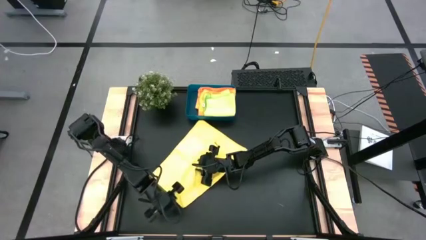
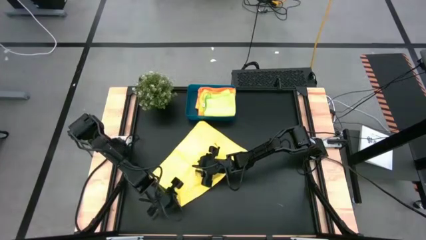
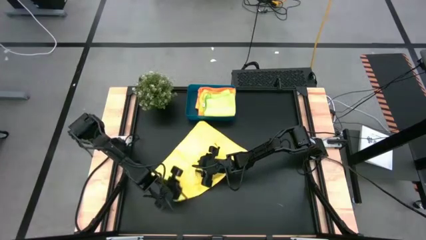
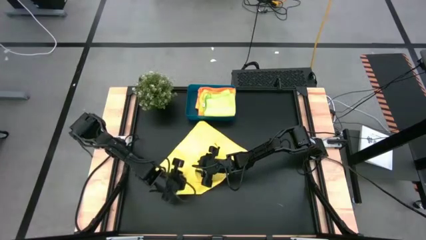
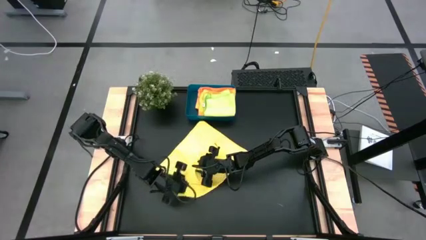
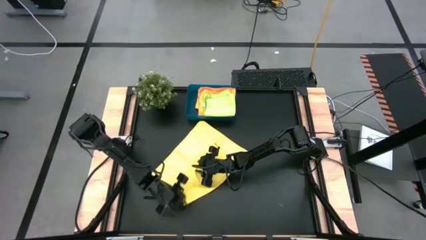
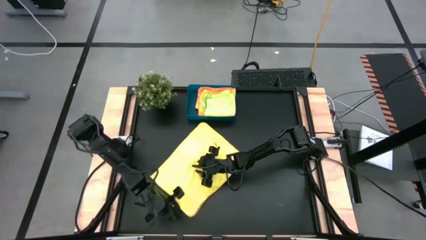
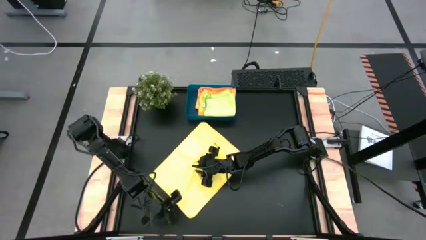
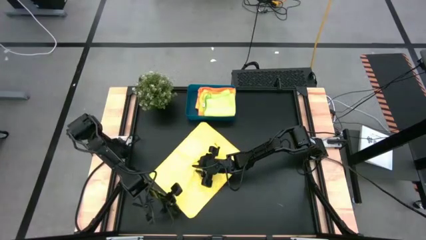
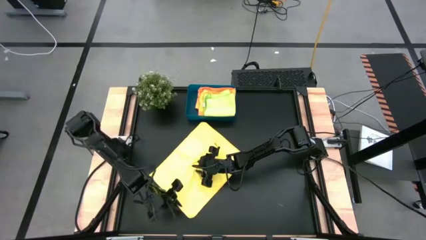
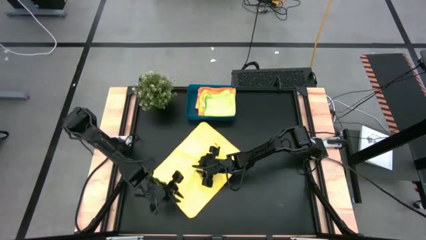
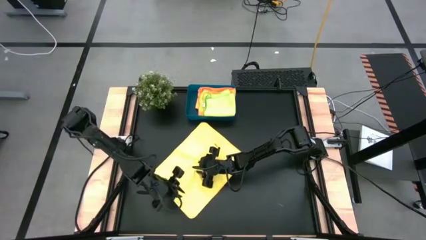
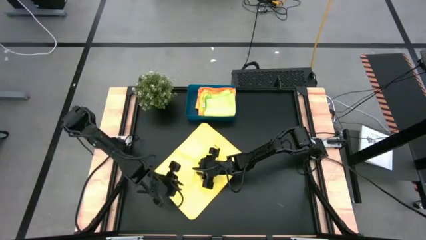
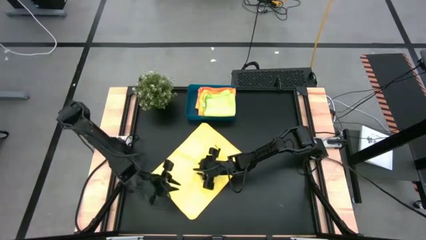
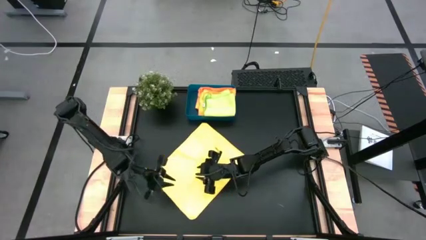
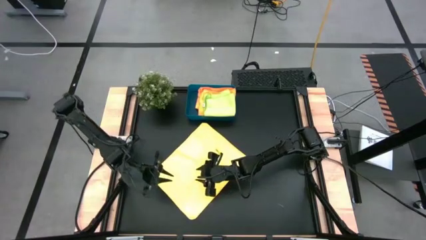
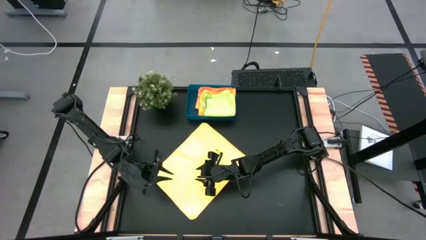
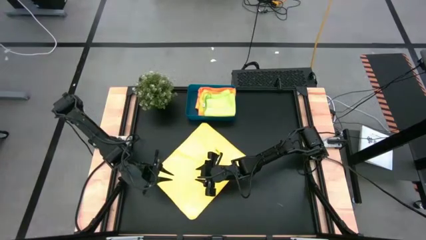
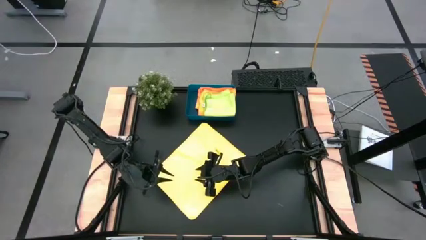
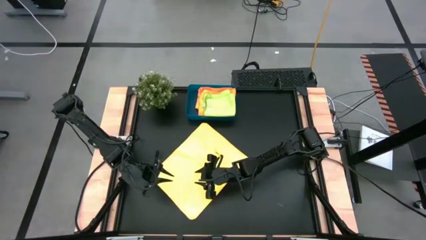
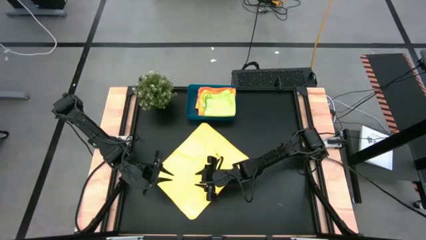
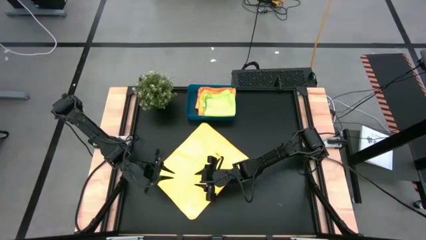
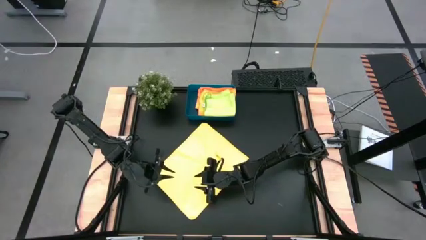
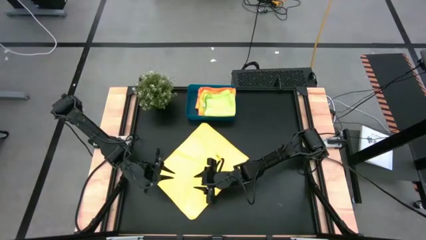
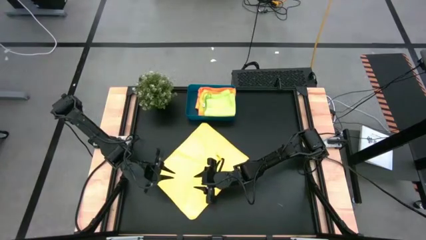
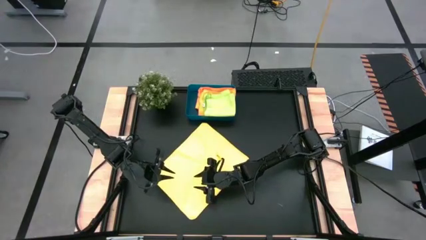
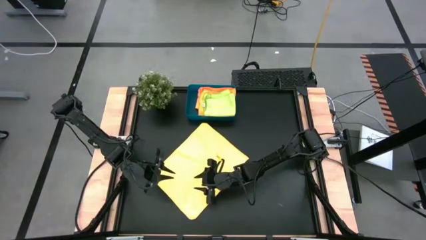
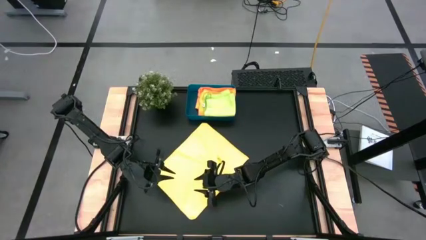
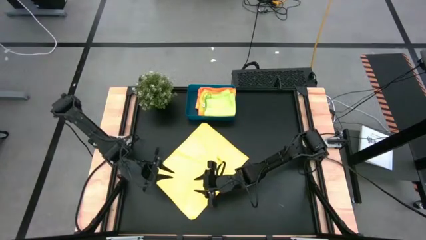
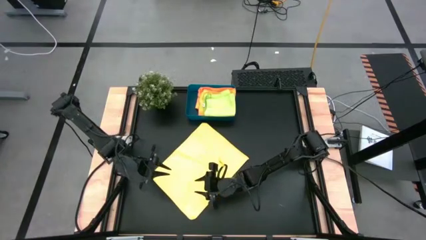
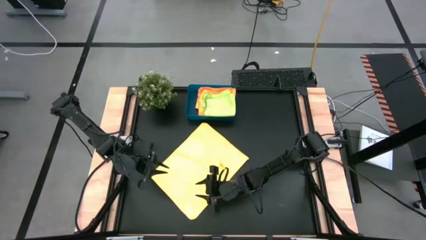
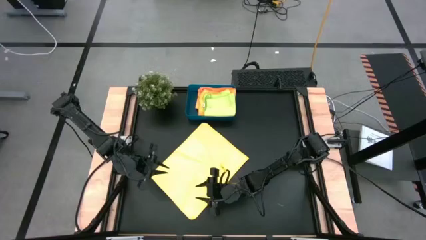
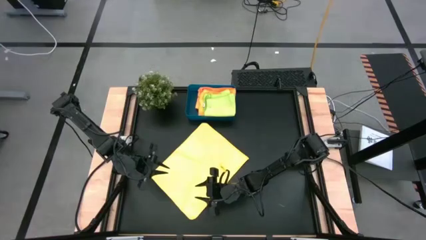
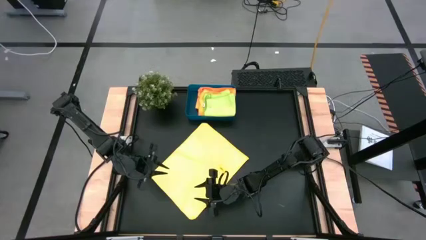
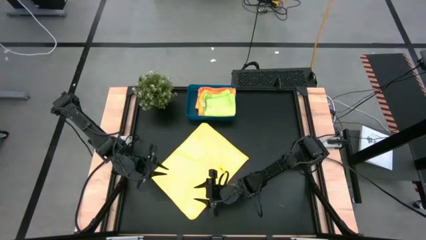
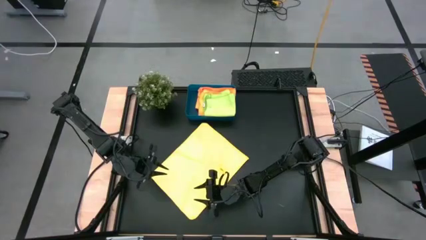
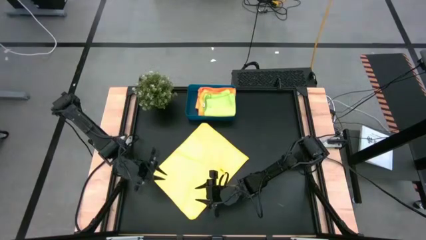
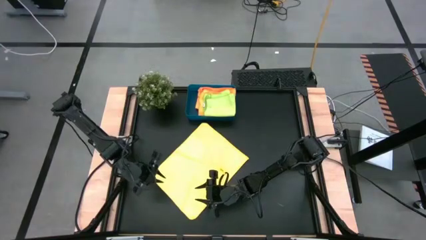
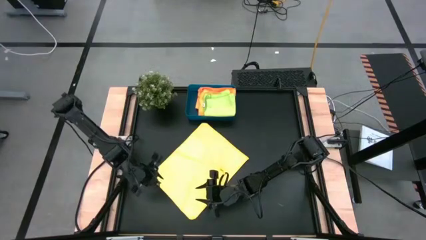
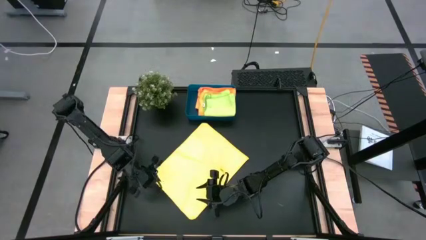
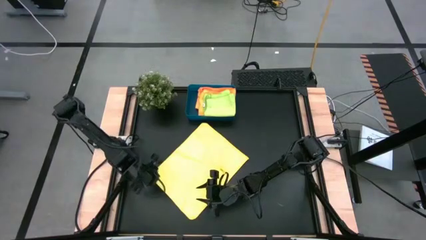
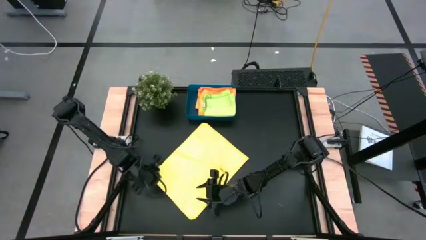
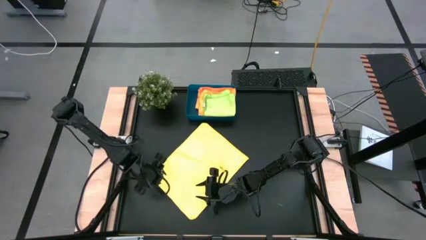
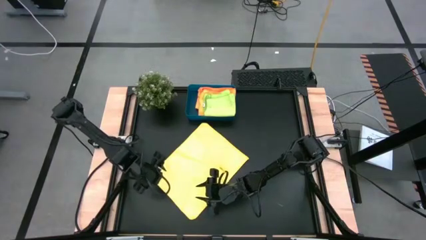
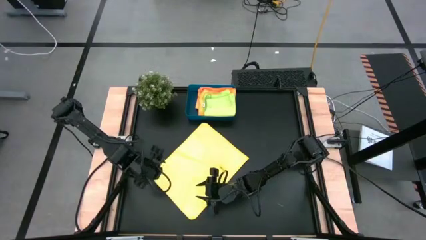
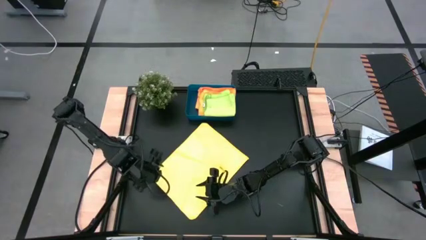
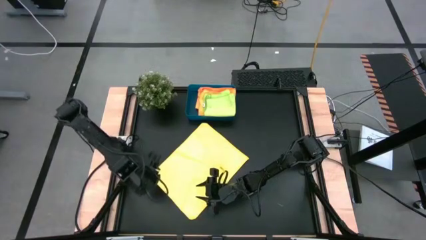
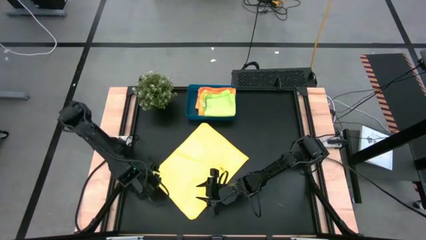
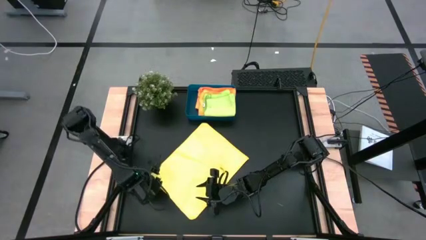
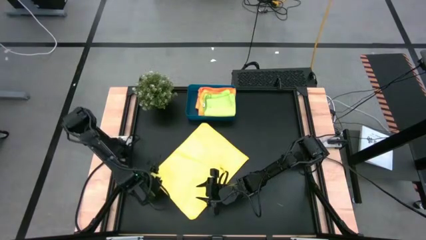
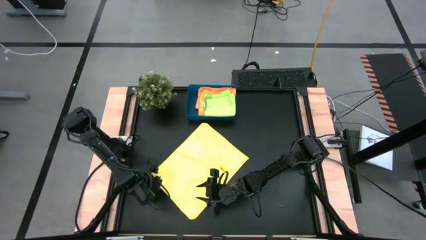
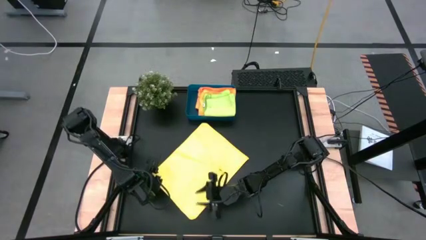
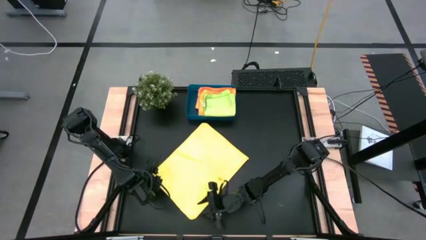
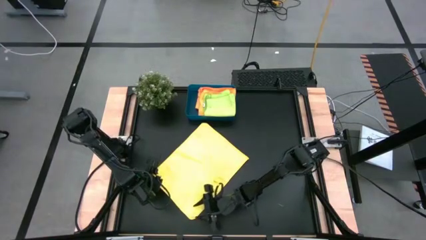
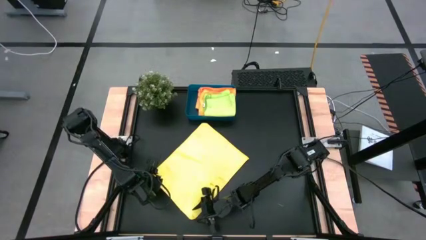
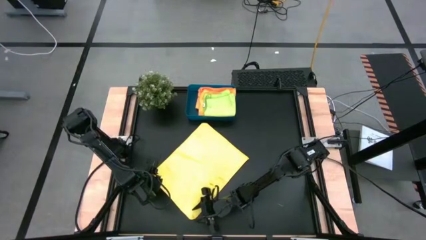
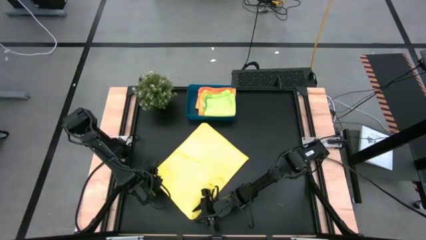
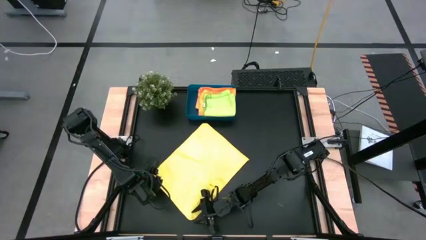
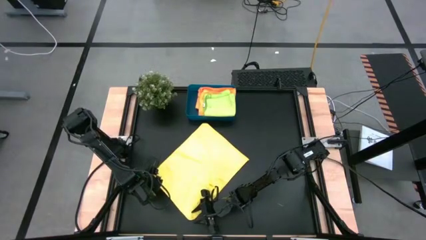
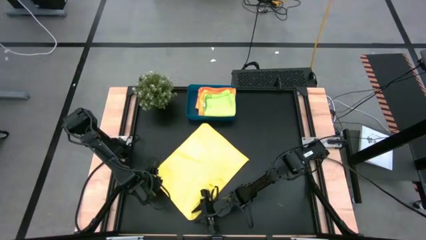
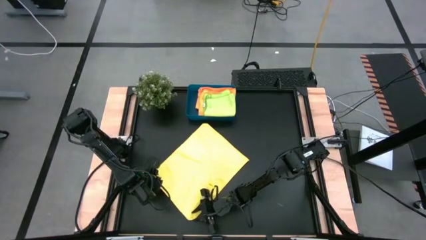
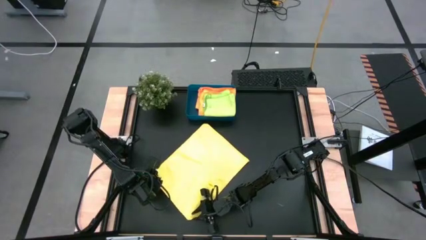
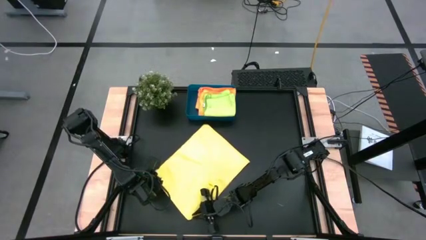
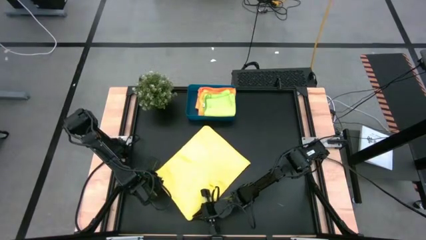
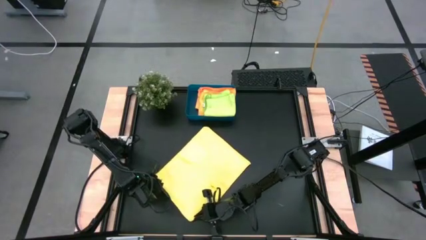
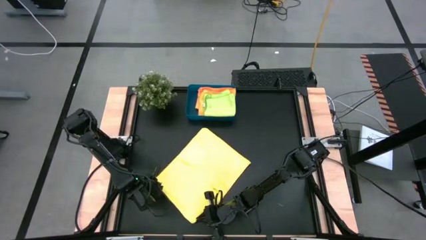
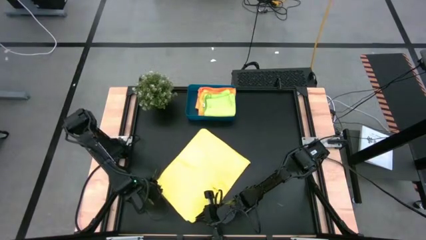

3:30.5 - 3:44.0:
Task: Fold microfiber towels
Fold the yellow microfiber towel

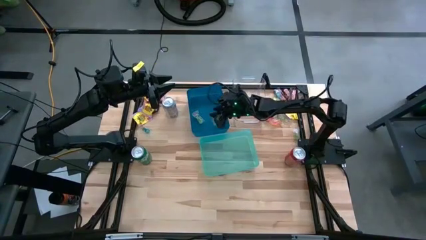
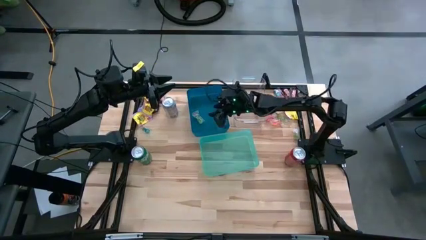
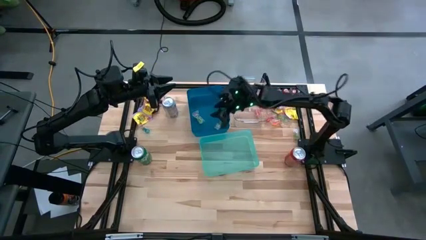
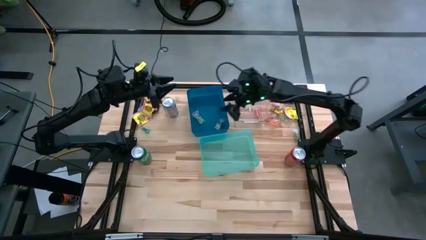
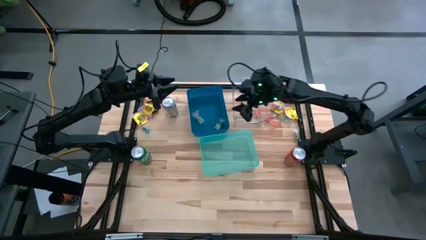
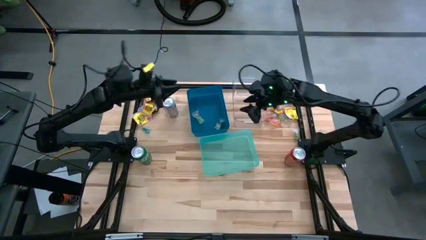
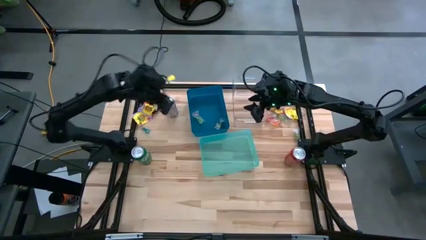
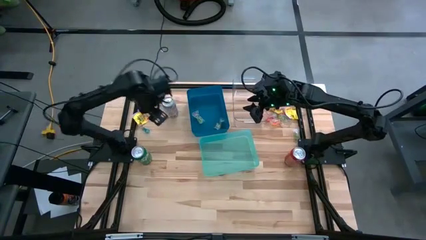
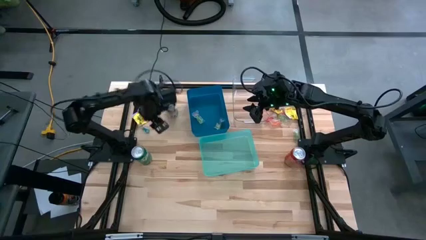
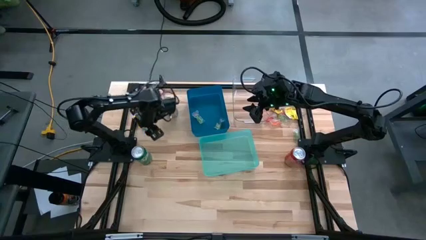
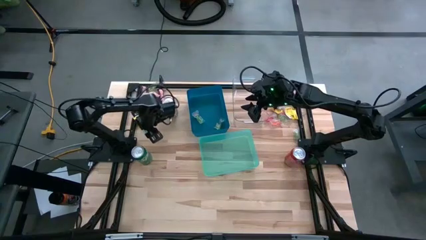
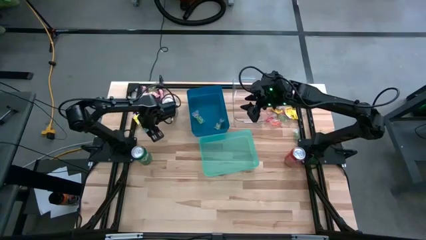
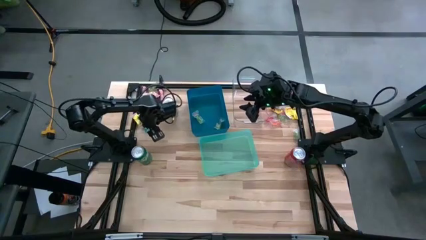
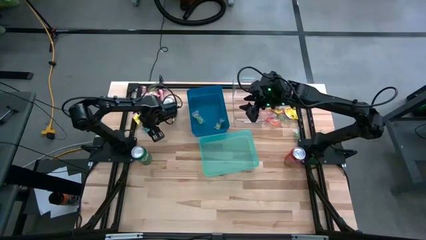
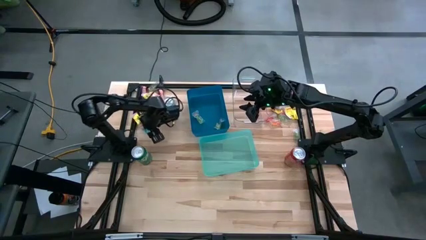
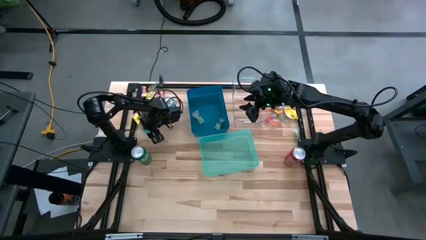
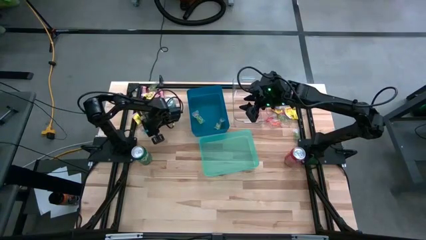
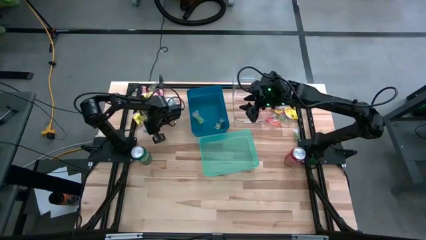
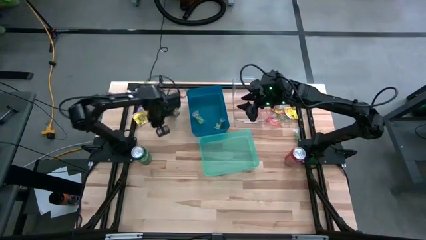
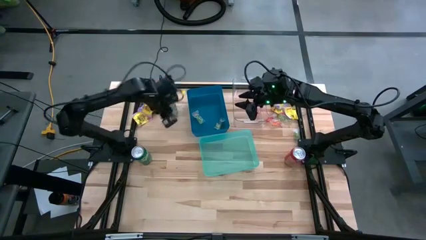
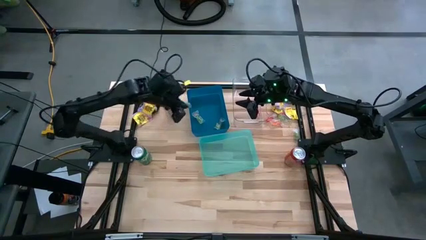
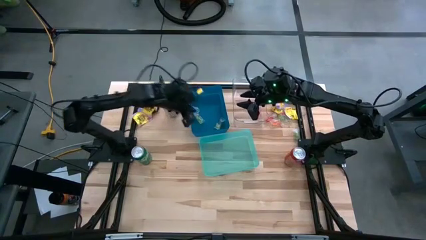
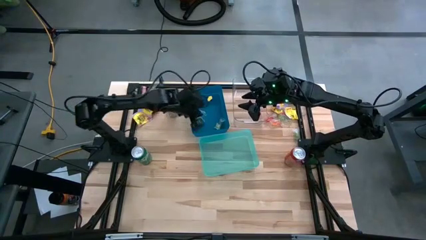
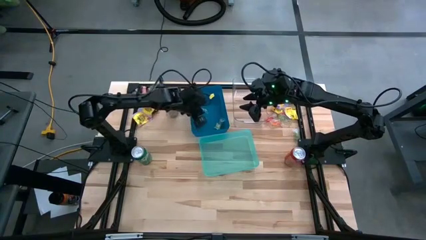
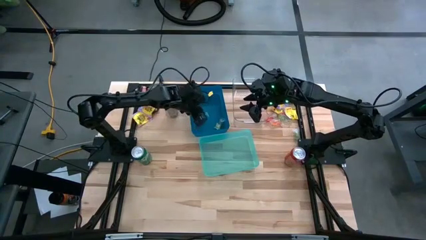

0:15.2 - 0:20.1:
Task: Sort candy
Put the blue candy into the blue bin
